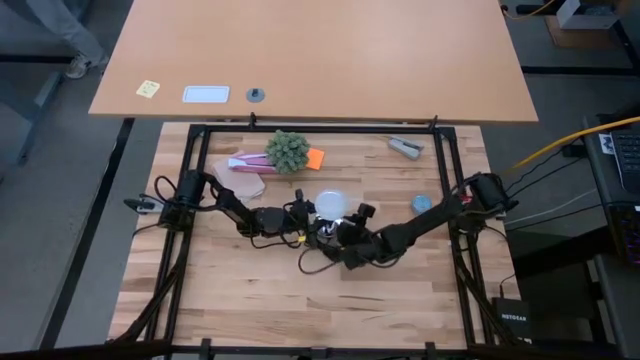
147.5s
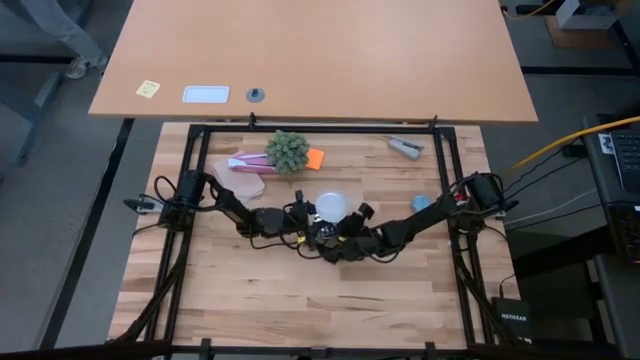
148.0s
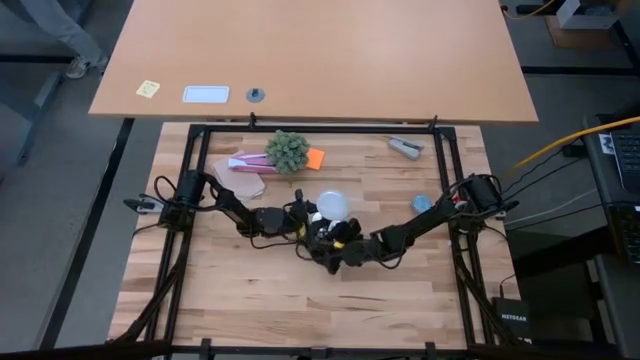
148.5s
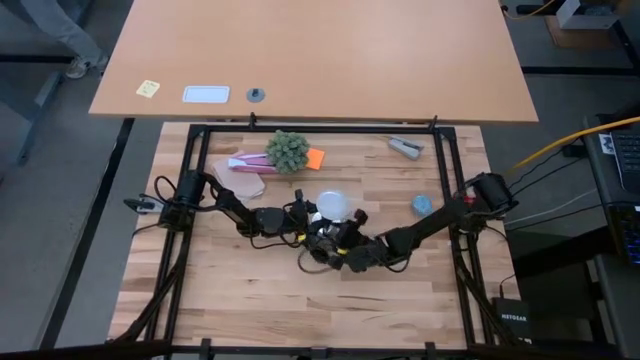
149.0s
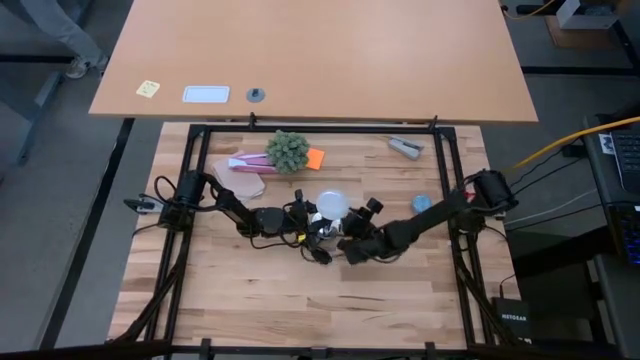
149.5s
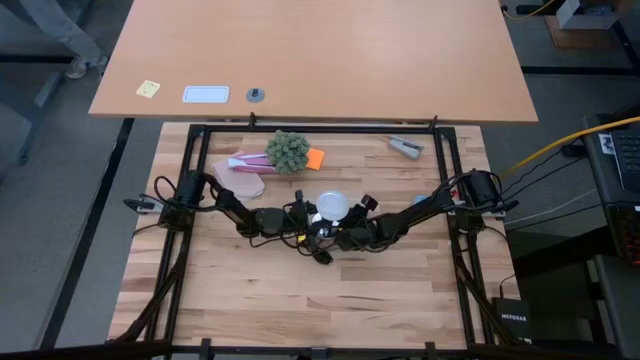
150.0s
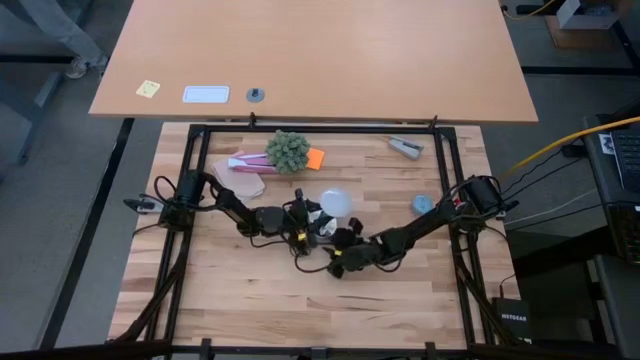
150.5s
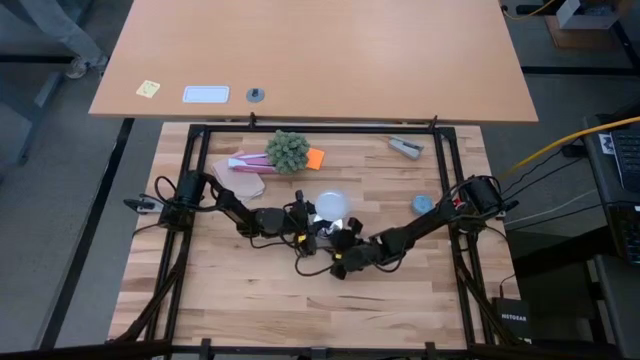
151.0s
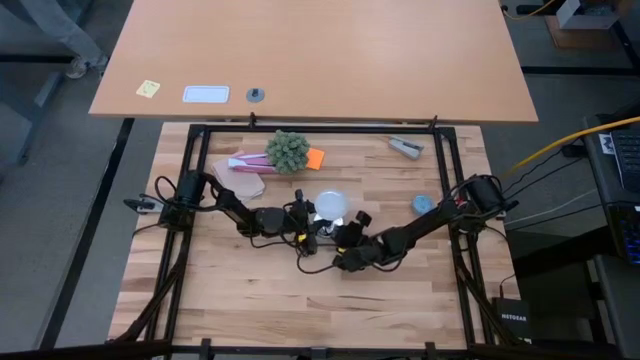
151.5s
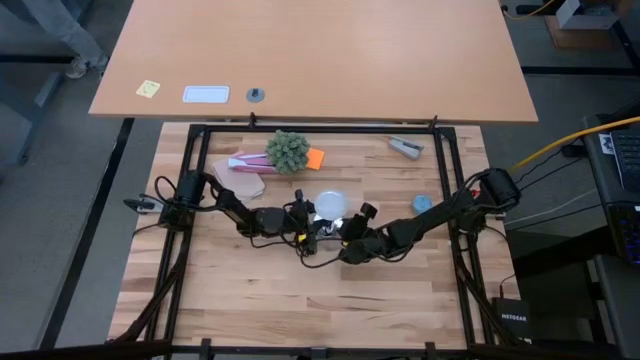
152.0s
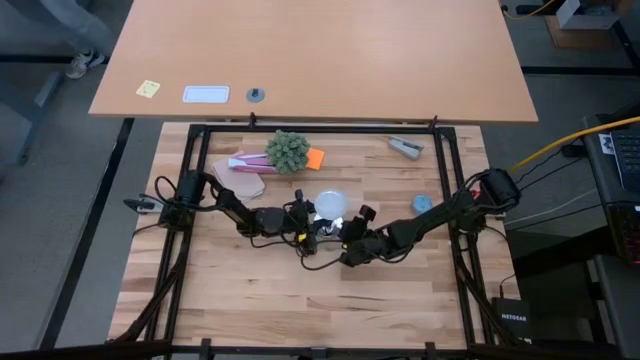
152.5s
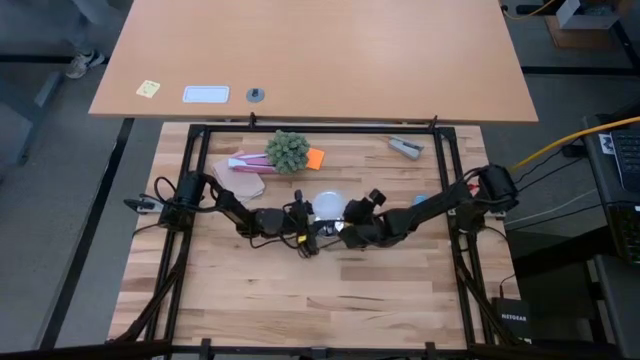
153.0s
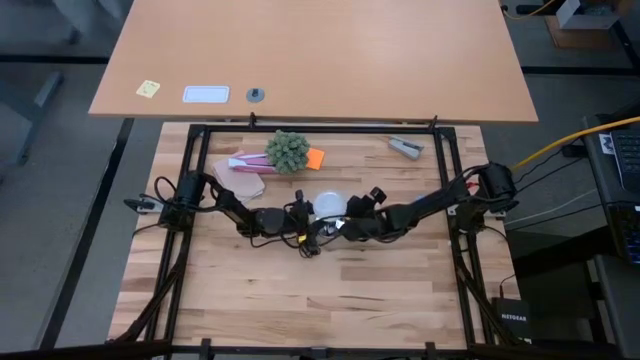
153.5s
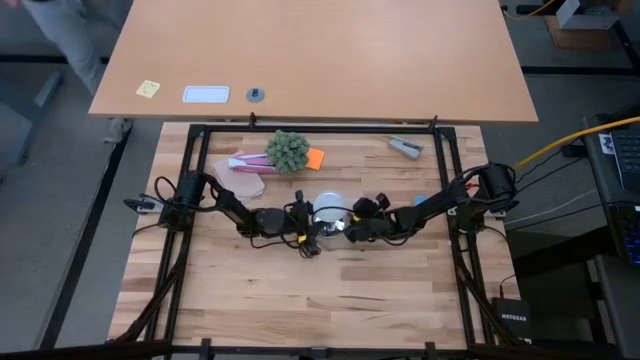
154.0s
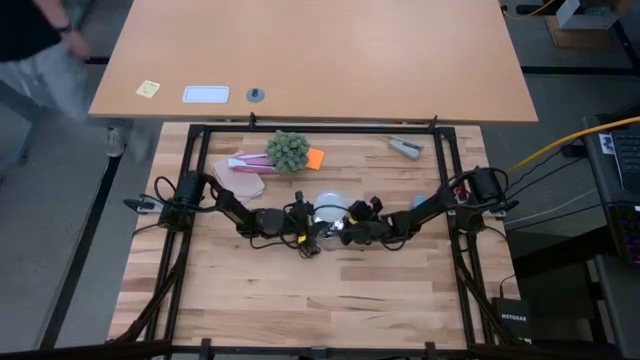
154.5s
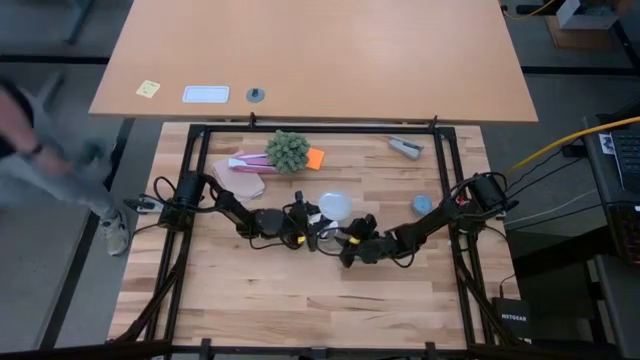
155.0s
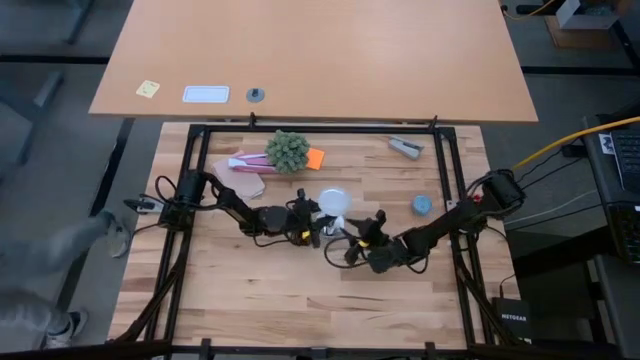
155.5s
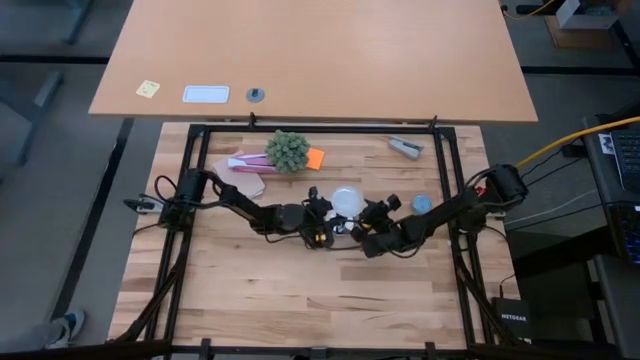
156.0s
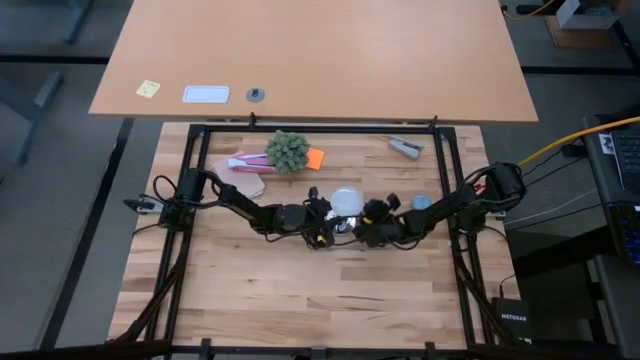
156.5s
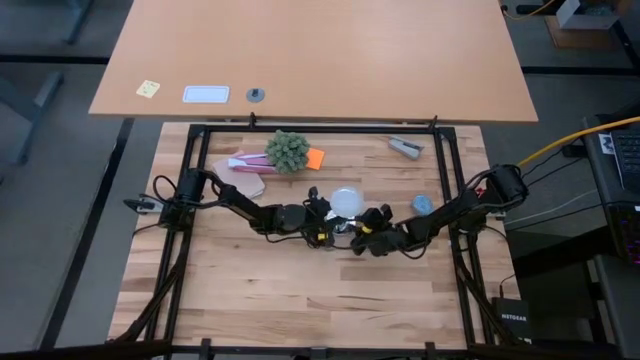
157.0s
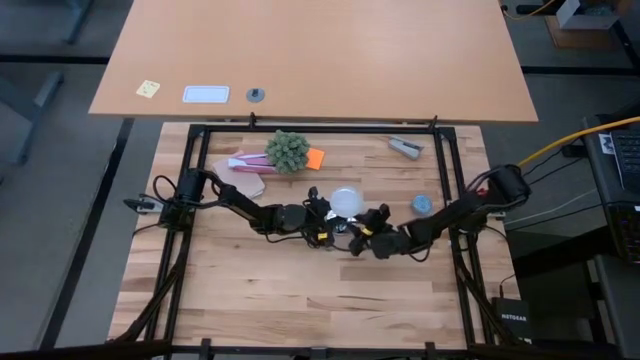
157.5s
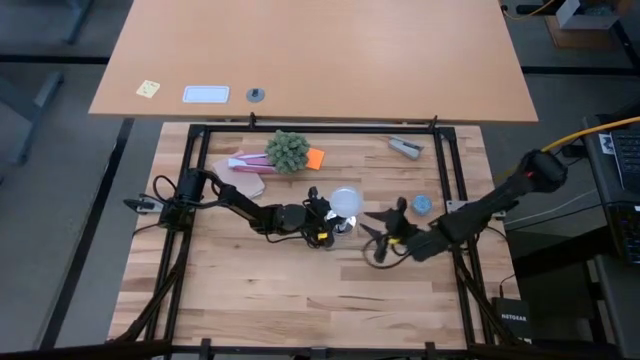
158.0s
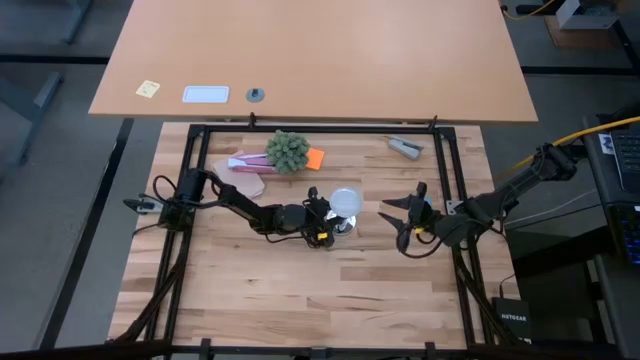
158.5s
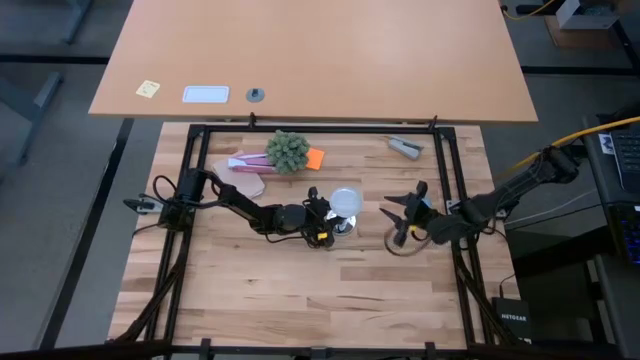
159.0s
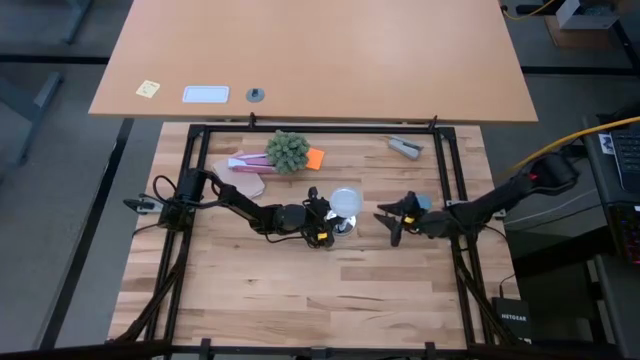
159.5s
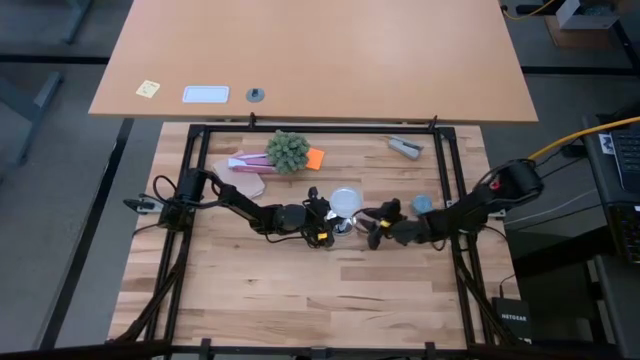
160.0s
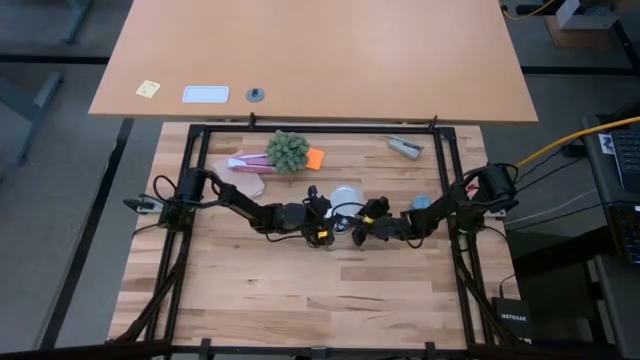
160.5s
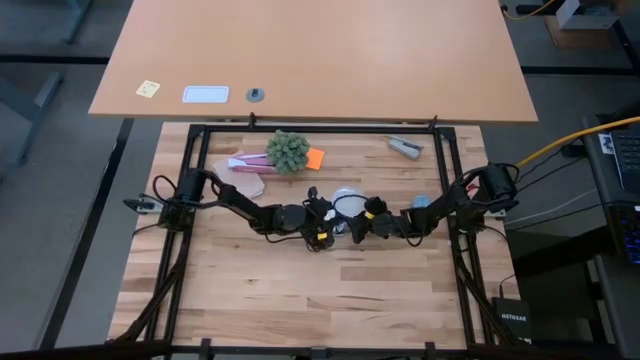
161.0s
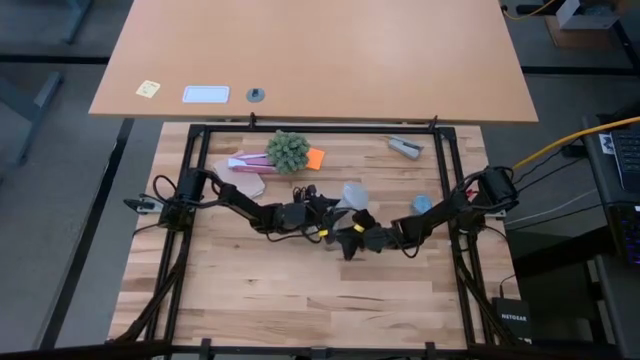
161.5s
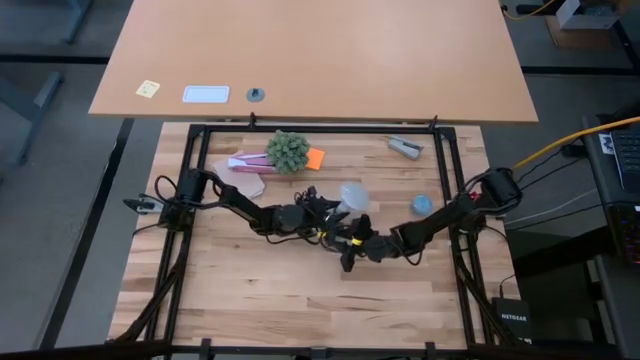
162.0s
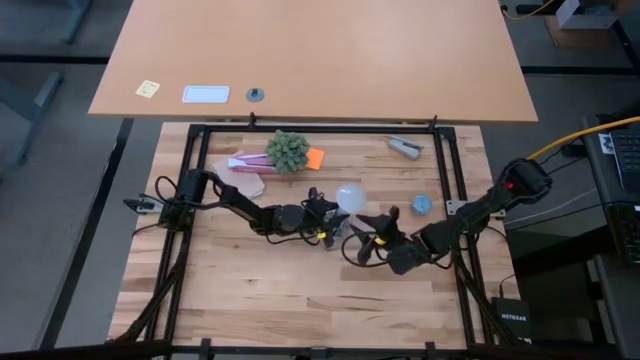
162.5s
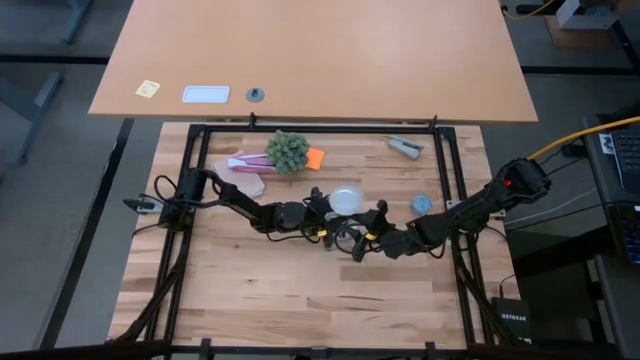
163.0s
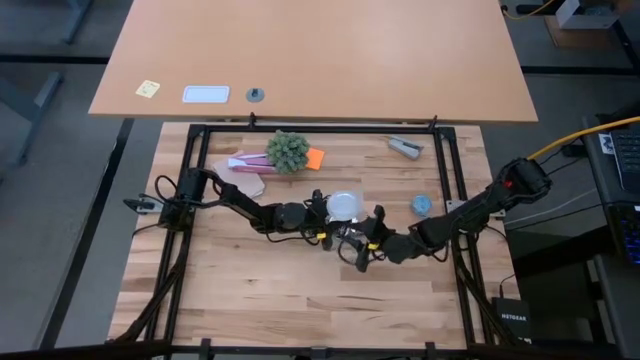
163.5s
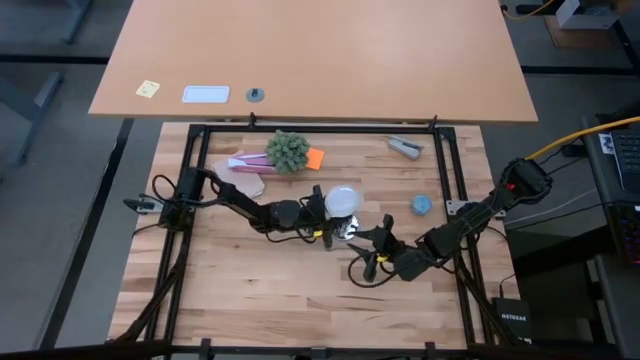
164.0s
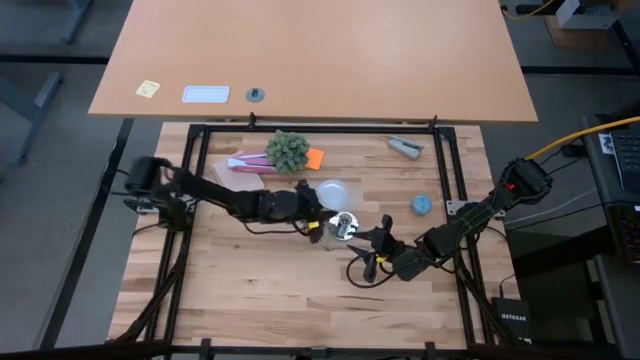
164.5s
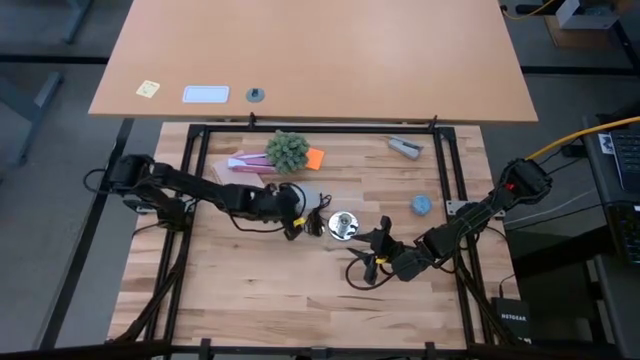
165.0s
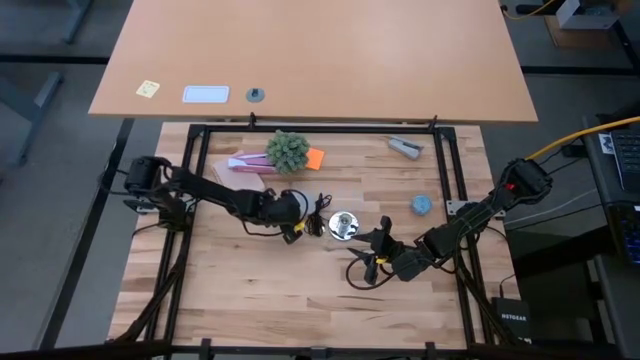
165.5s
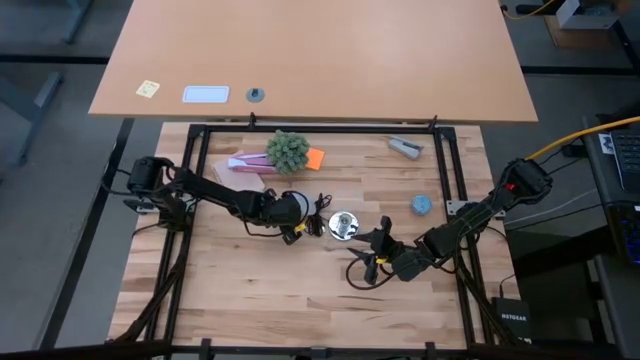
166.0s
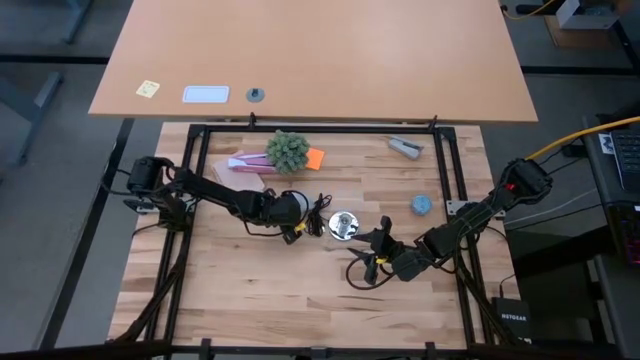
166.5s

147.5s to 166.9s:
Task: Screw lightbulb
Remove the lightbulb from the lamp
